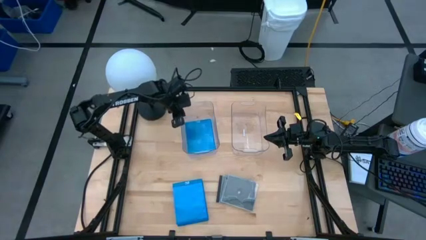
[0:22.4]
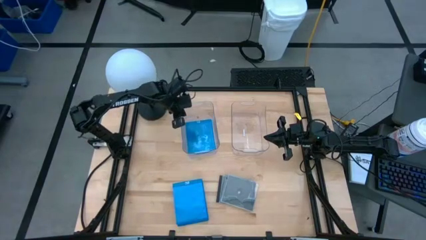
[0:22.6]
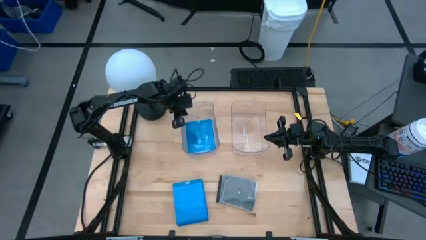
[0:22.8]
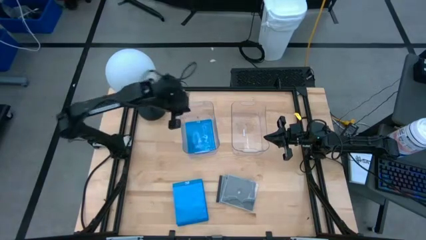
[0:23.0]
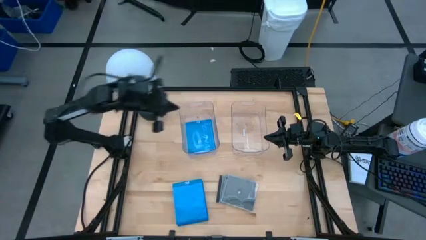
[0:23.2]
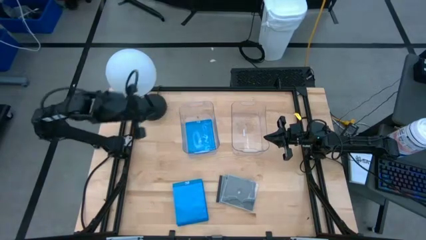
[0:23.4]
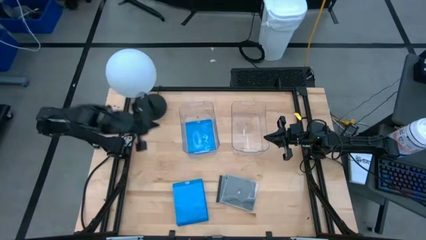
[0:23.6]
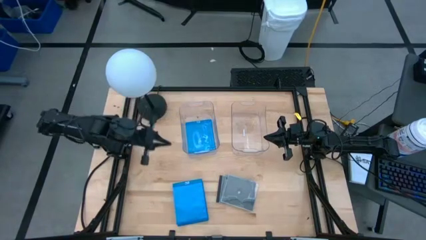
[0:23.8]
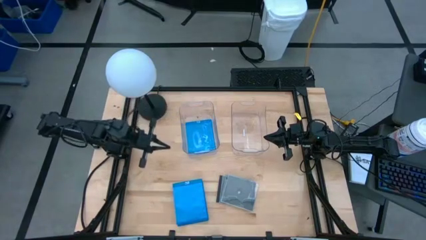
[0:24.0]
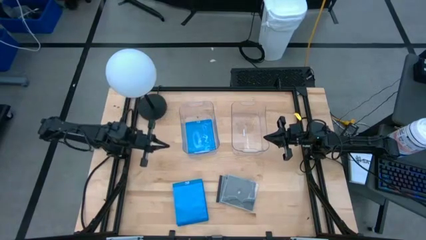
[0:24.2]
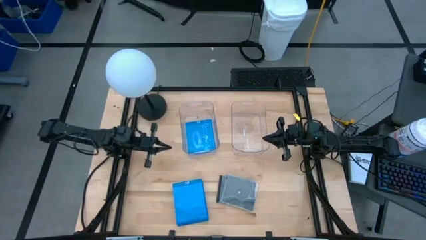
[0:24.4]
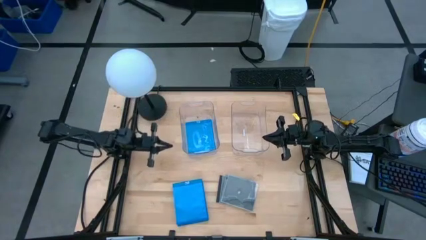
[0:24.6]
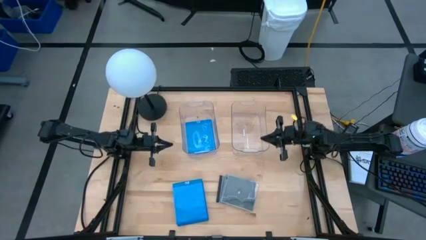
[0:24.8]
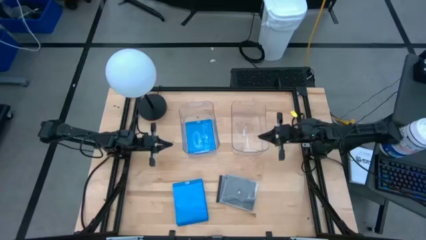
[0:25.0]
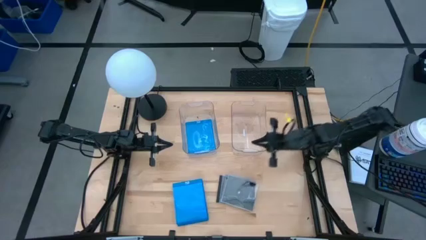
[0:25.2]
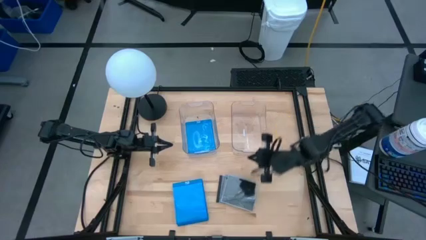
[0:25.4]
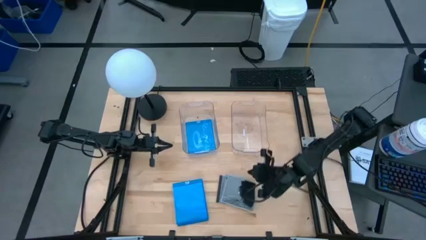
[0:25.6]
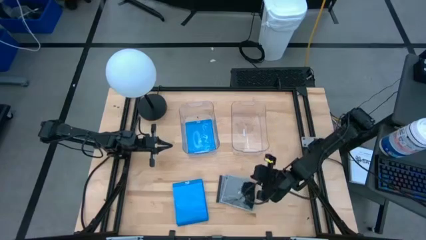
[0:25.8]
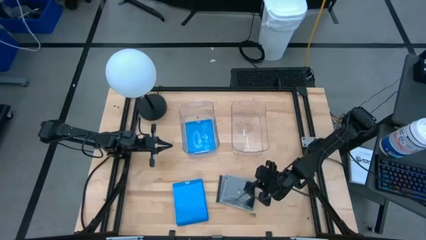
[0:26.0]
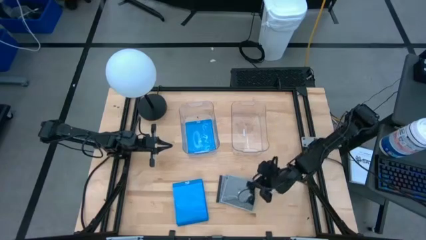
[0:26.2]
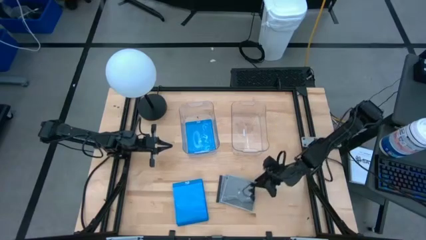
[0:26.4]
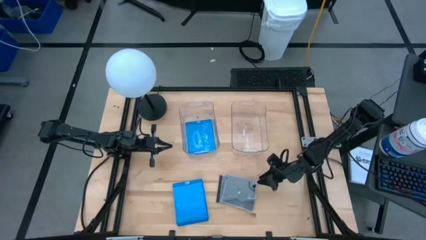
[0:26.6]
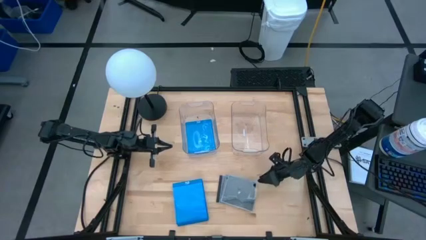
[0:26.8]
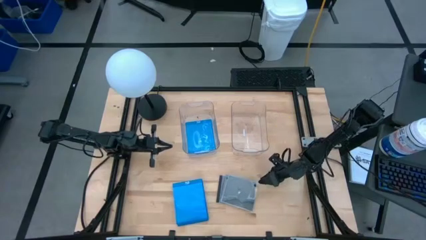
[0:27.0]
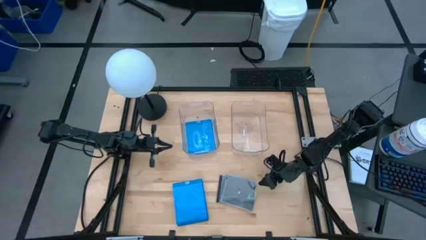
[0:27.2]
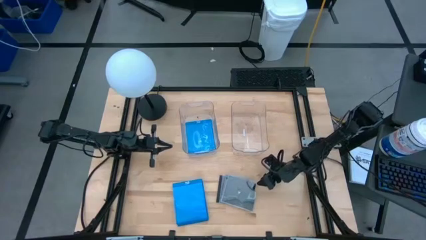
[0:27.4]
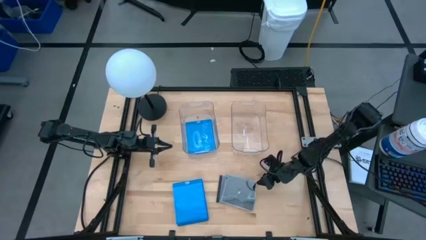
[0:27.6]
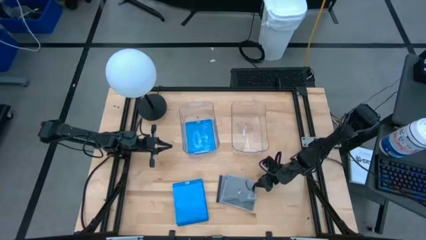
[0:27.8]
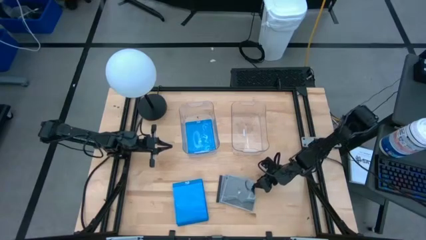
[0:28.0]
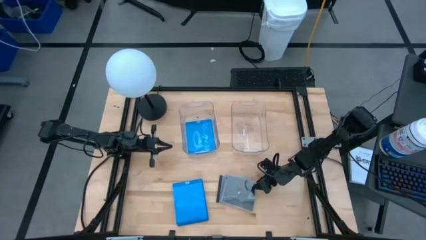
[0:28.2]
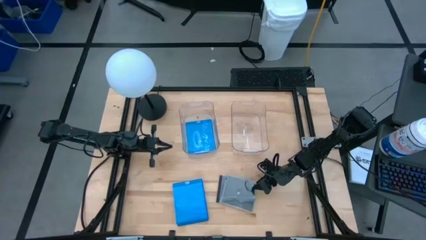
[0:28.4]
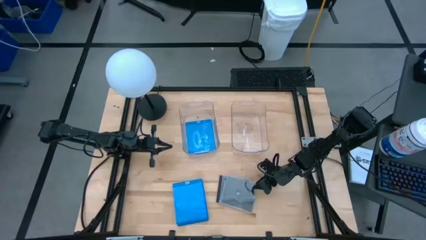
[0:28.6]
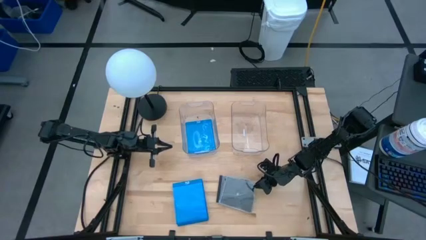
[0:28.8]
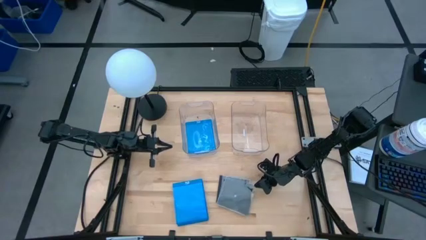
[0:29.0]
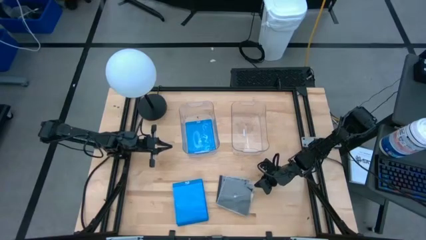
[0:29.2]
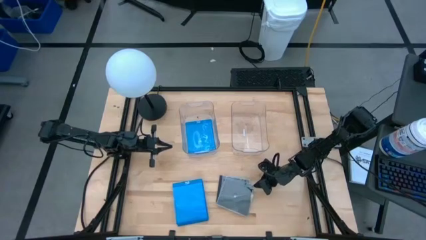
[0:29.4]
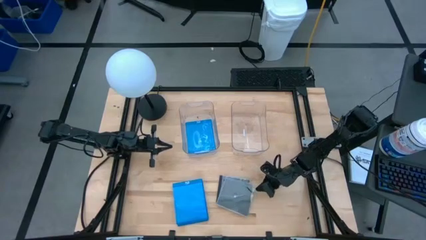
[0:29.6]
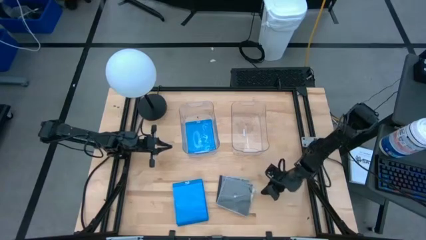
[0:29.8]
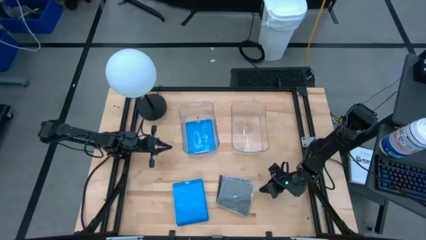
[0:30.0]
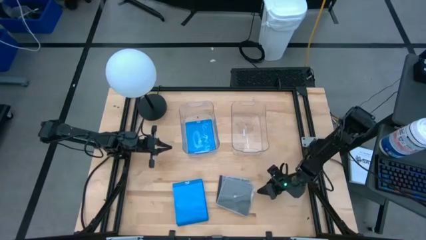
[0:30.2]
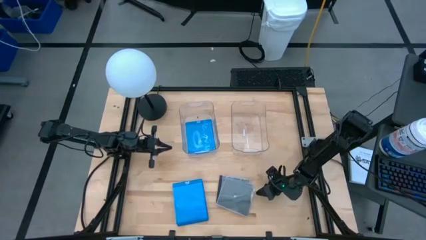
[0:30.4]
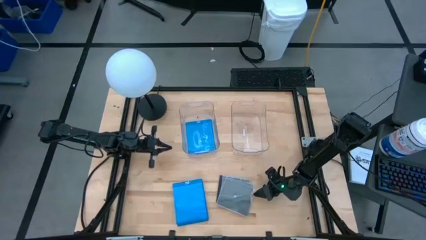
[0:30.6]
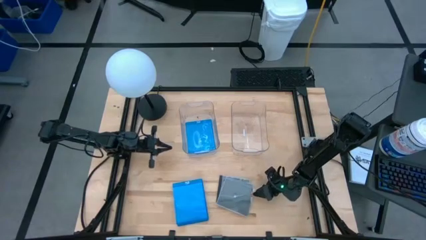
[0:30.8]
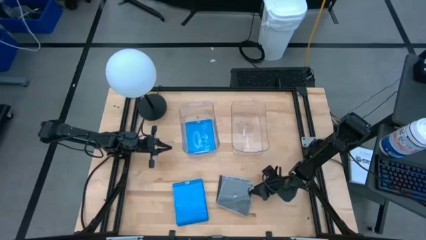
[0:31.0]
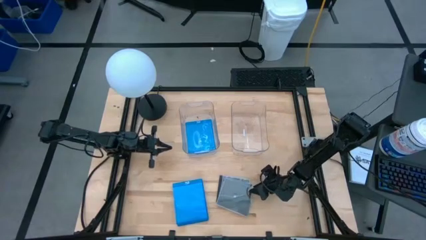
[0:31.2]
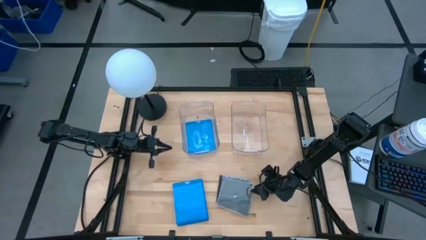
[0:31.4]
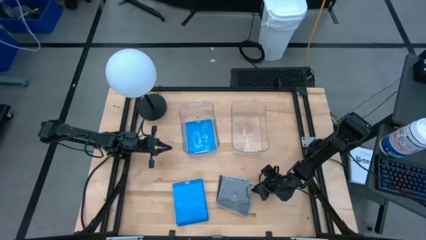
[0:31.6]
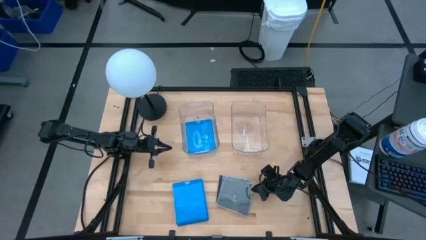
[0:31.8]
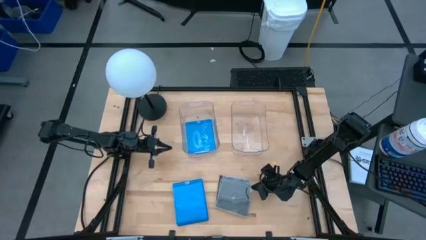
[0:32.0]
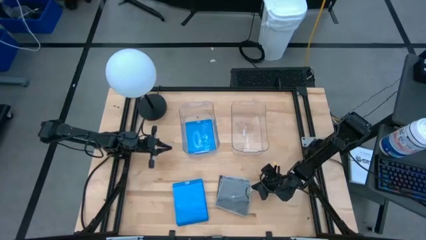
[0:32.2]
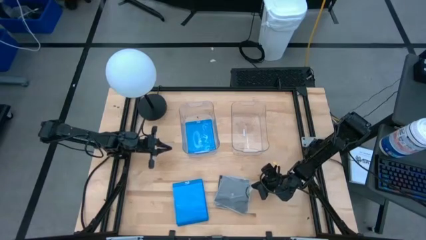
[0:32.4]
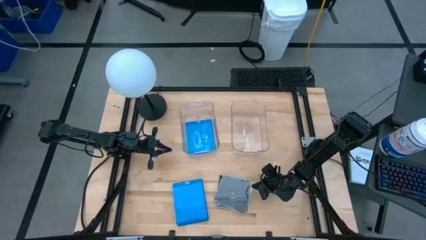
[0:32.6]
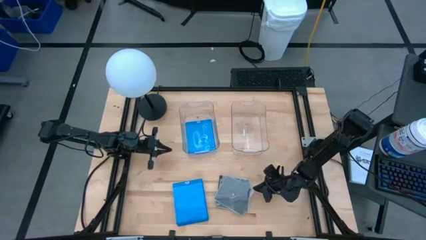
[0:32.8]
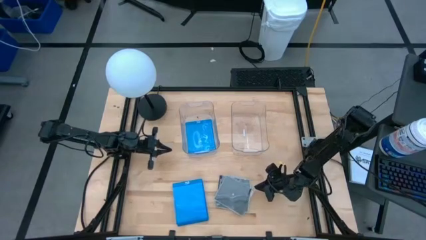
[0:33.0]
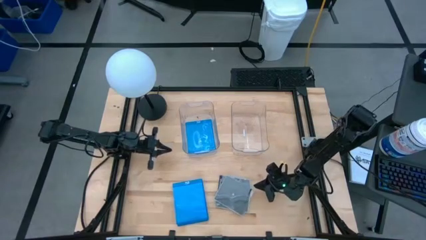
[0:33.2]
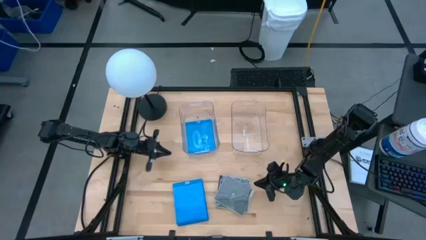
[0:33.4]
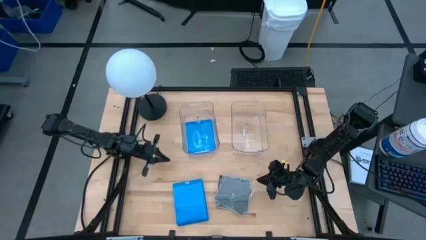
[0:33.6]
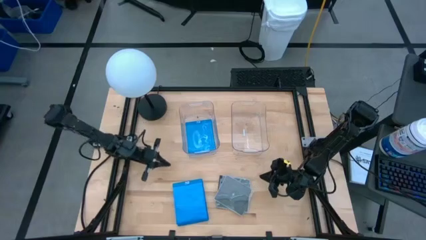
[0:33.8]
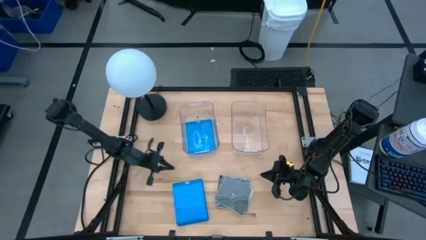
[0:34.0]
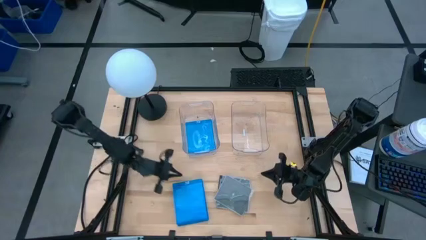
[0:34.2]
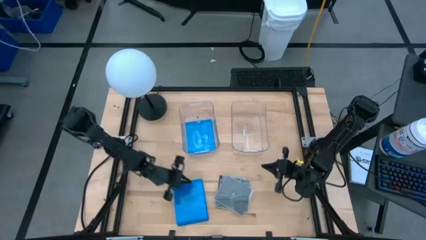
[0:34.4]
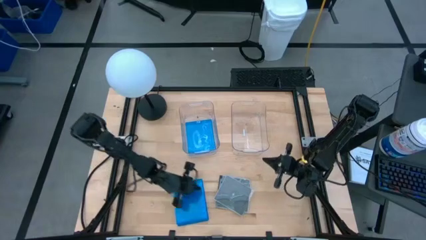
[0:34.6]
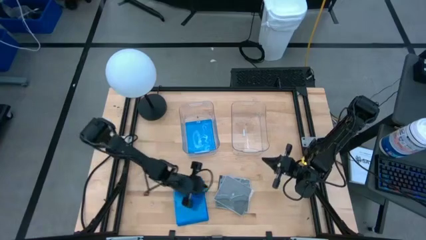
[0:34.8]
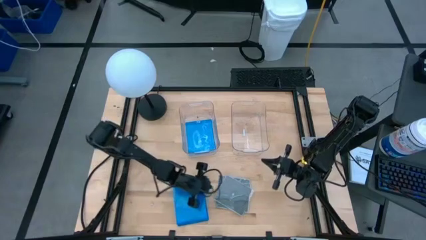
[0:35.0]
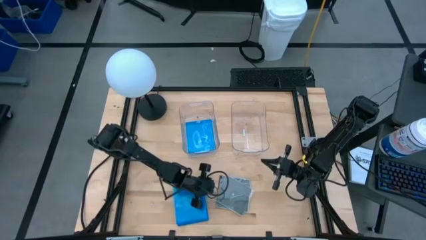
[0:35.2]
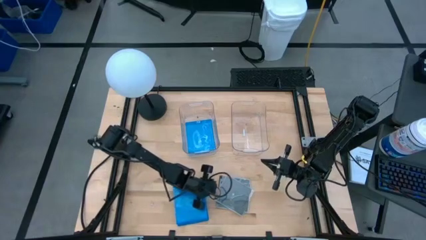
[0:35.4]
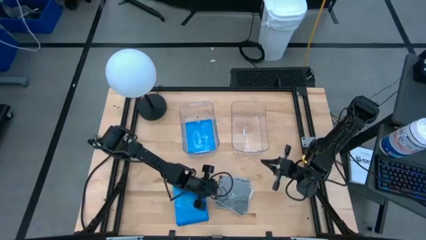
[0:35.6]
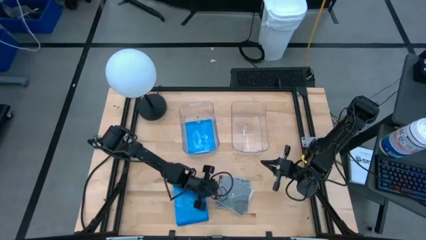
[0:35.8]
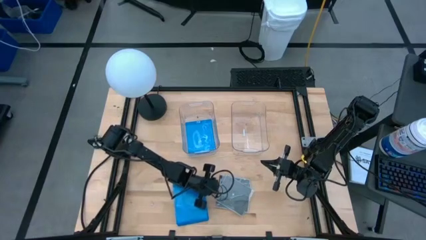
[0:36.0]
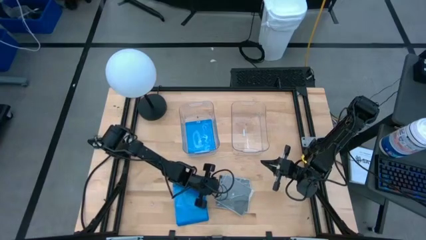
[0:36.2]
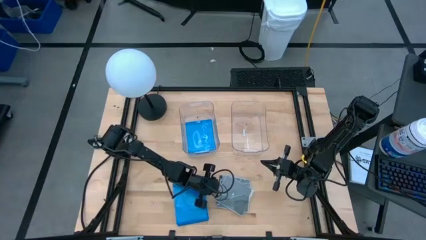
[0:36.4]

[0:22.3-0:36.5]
Task: Pick & place jewel cases by type
Put the black cd case into the right transparent bin

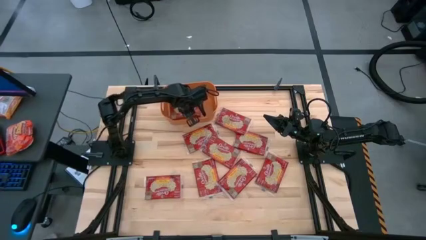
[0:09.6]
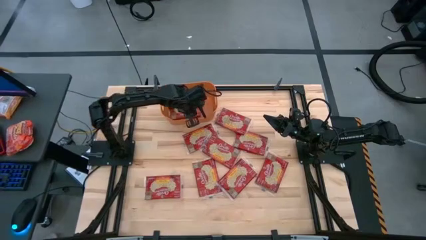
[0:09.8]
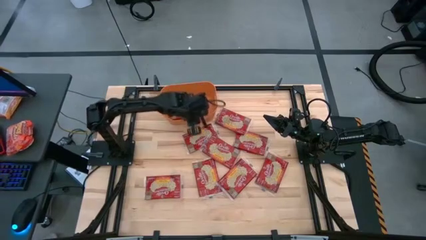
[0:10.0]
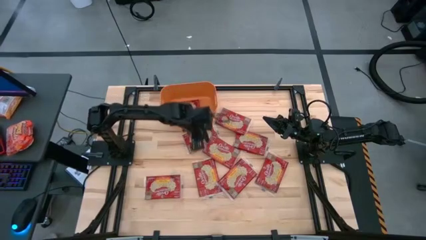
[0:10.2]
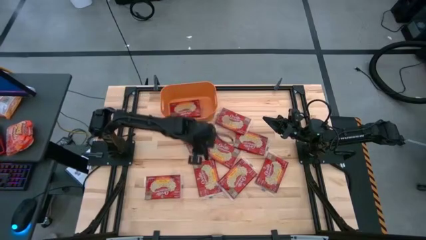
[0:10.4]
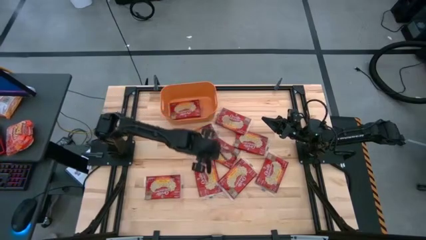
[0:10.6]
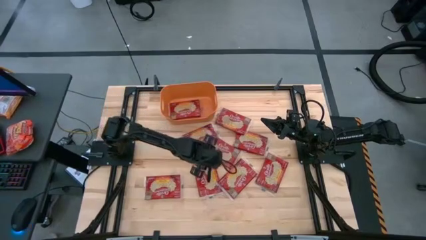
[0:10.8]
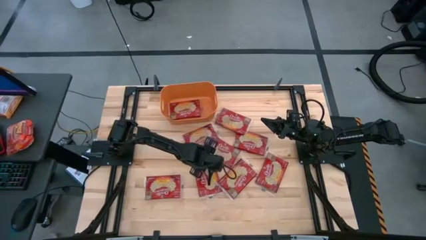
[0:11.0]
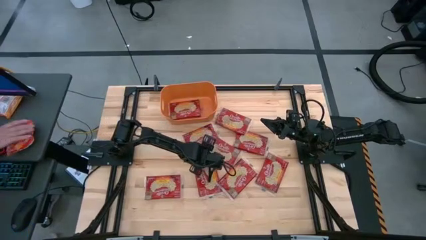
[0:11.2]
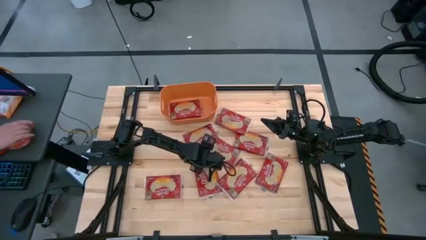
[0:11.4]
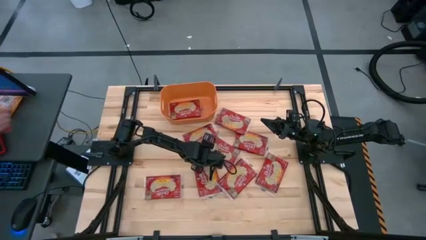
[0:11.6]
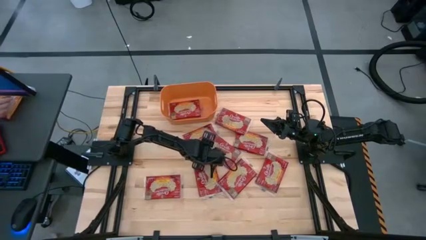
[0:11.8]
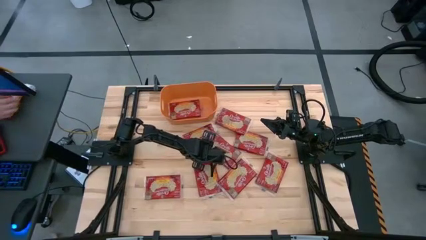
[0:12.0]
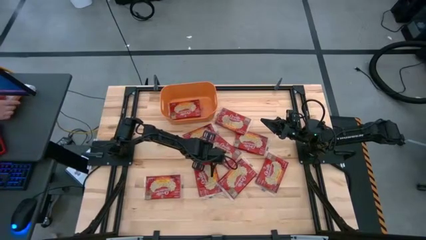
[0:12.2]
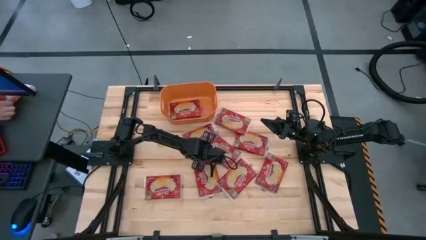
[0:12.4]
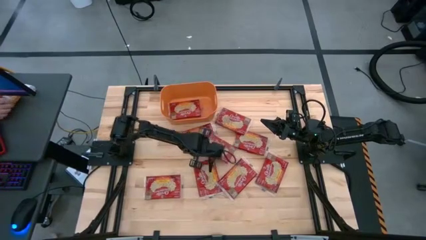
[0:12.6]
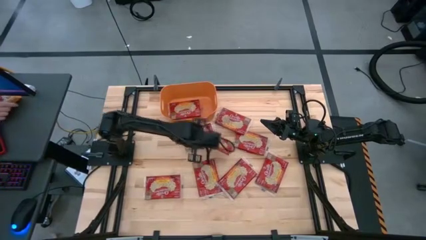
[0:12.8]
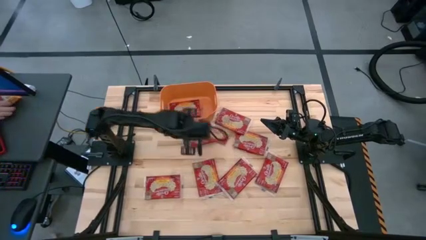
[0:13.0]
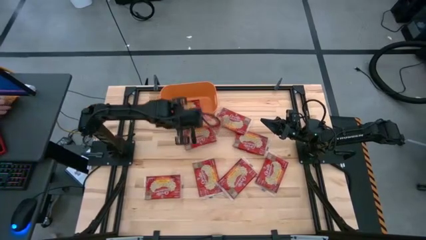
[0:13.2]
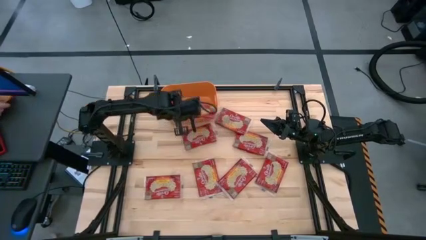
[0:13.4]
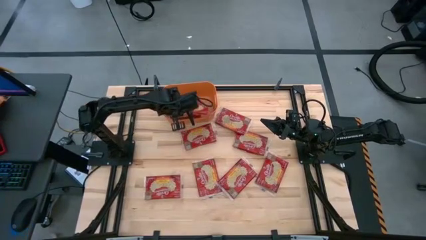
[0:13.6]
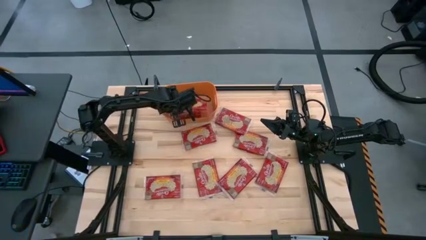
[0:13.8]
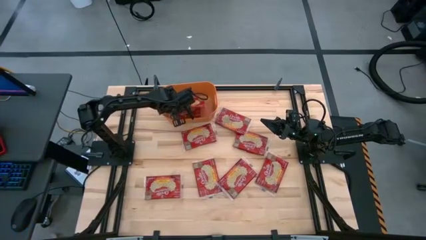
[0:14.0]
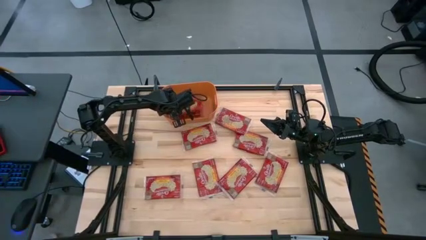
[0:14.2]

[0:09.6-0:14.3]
Task: Sort popcorn bags into baskets
Put the red popcorn bag into the orange bin
